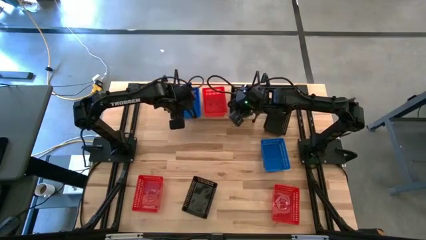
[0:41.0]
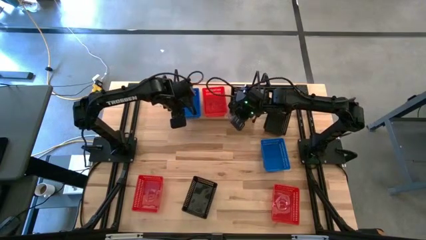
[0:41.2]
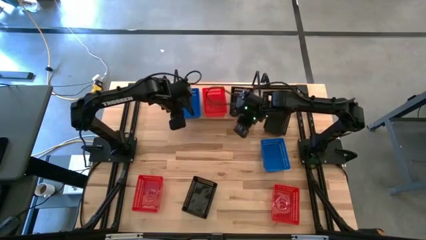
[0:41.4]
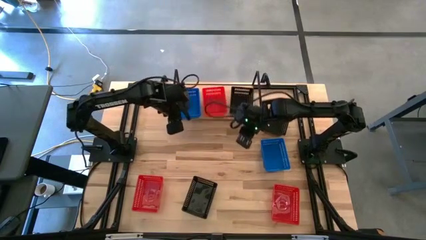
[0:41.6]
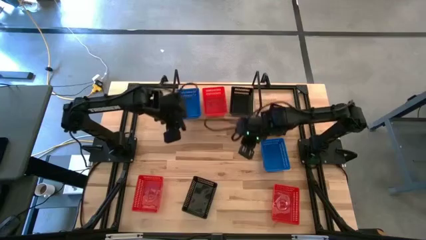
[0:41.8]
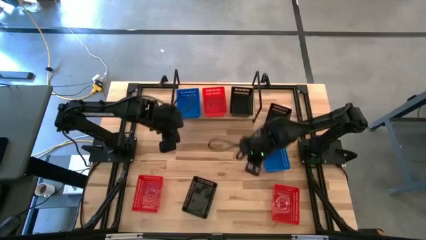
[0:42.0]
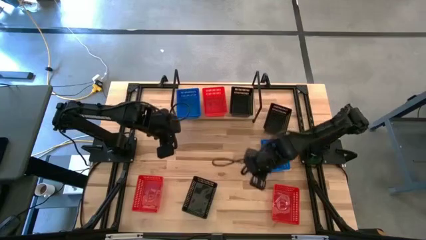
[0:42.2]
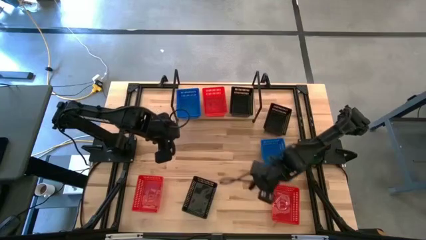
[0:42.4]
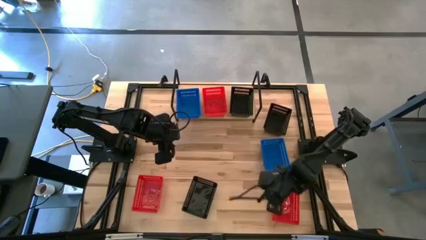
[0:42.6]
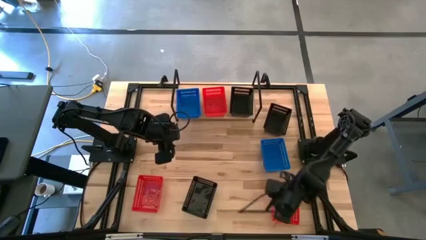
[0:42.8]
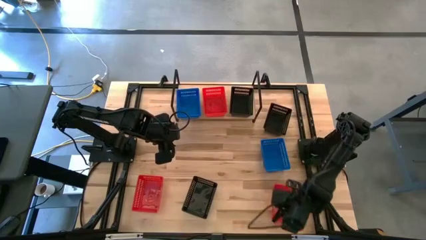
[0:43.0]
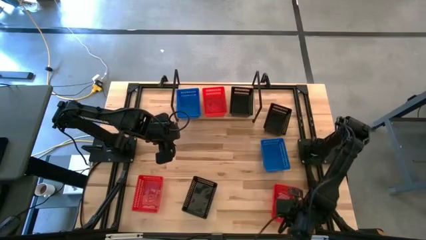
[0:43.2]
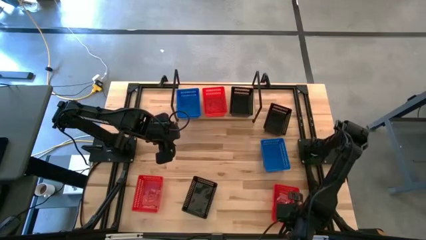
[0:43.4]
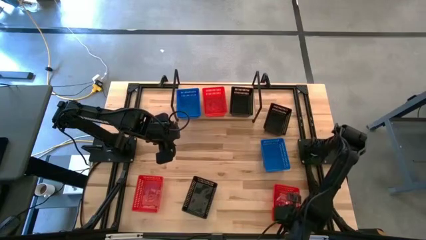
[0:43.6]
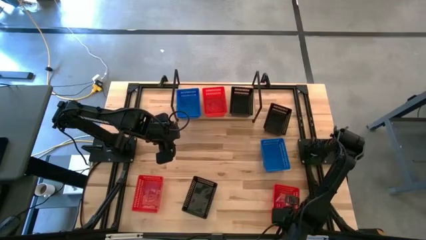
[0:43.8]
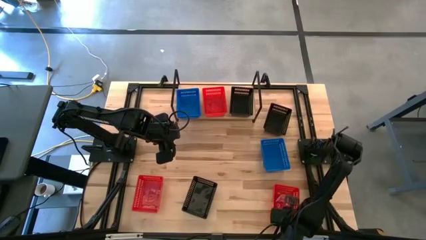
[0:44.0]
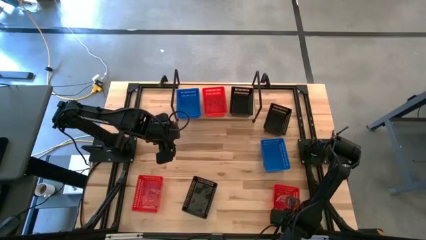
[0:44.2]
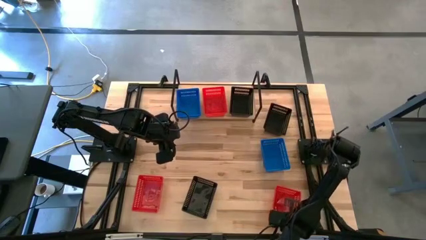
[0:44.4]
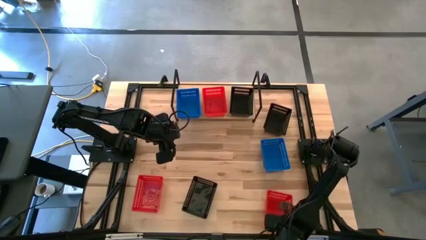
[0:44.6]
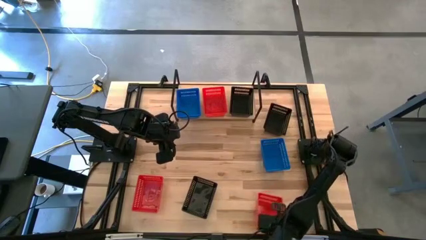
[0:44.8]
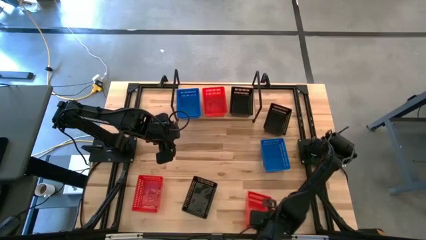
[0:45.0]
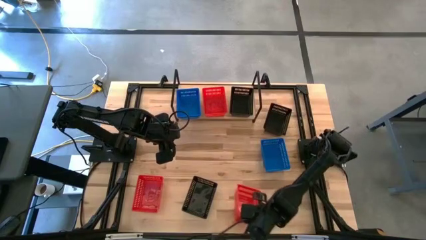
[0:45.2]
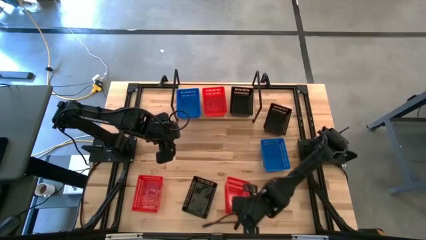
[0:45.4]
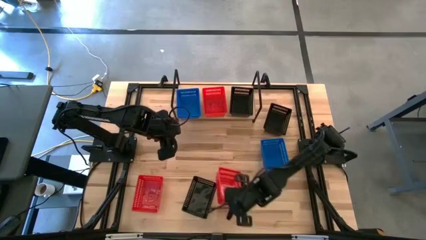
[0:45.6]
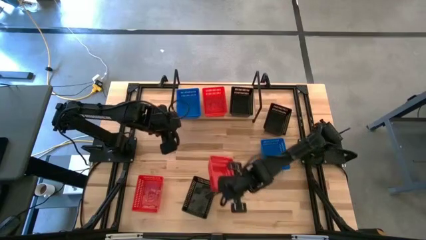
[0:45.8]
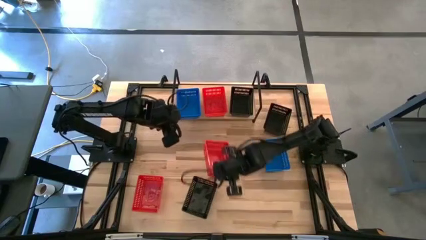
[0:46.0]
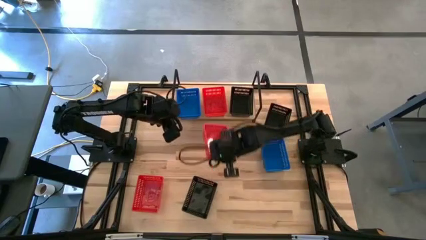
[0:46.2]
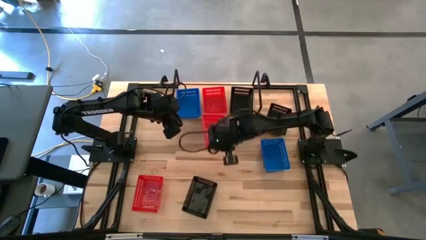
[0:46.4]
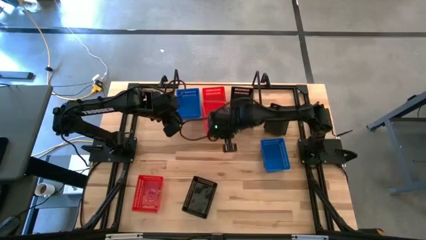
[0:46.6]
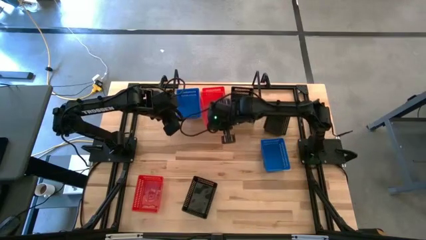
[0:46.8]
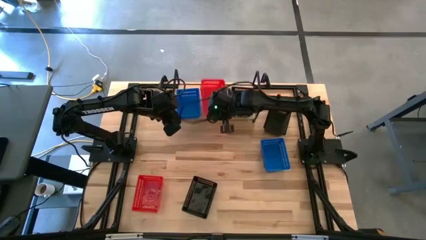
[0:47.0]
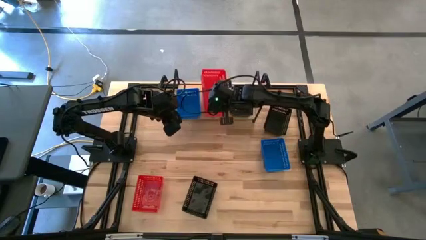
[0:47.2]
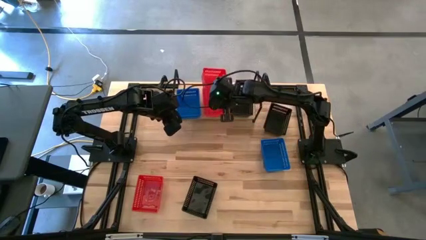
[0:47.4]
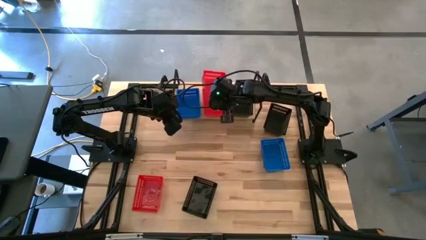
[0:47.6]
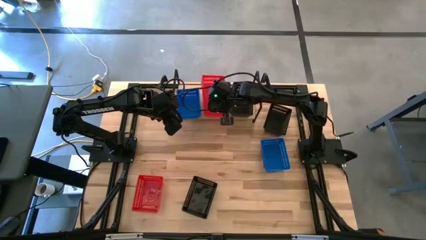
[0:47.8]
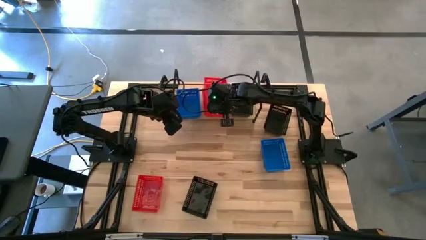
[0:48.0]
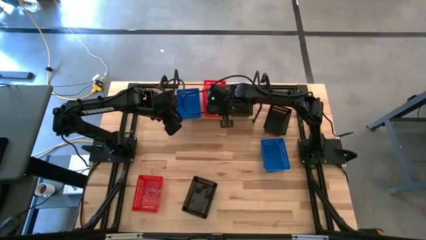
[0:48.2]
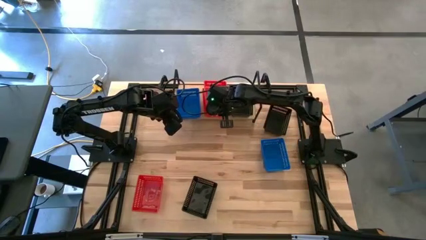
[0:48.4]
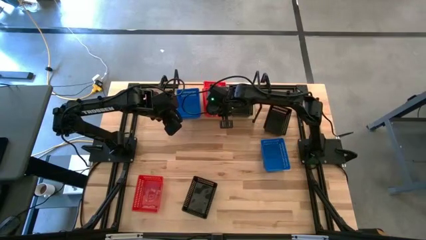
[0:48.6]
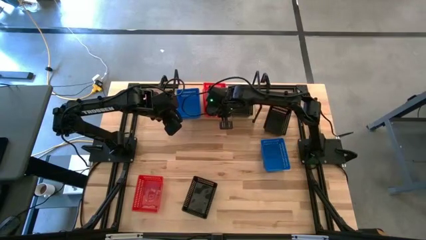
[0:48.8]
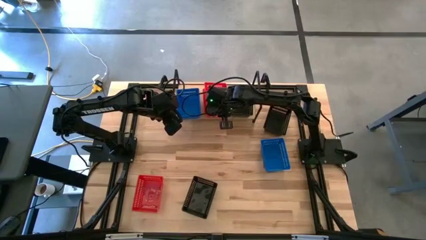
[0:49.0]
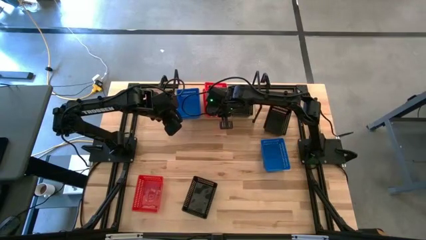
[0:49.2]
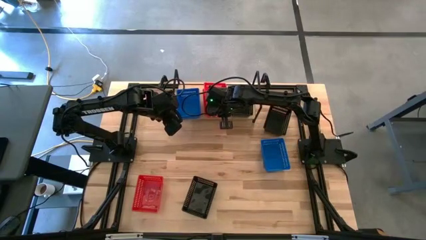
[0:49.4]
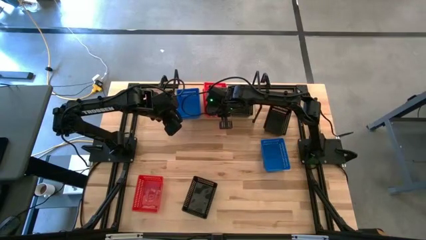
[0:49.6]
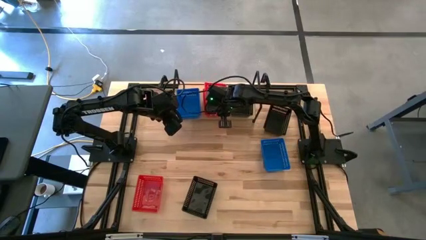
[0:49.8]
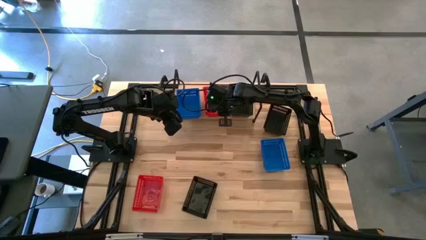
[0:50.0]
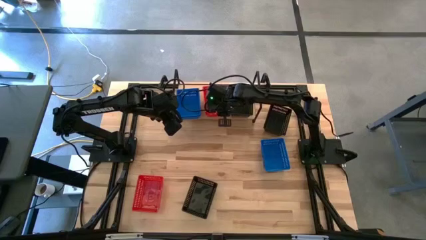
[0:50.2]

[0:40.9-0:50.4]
Task: Stack baskets on shelf by color
Stack the right red bin on top of the red bin on the shelf

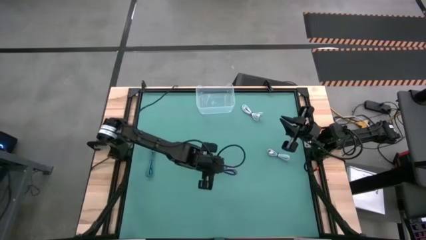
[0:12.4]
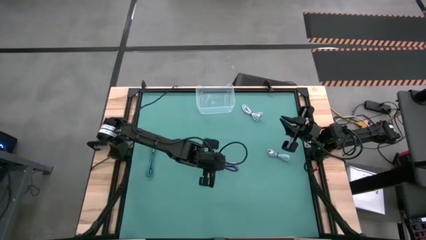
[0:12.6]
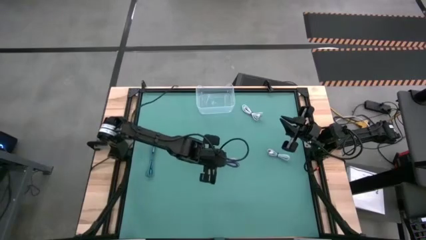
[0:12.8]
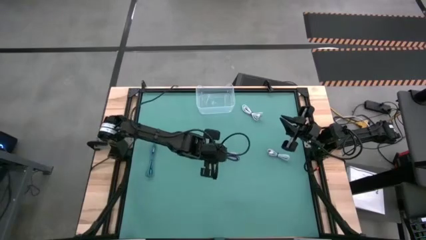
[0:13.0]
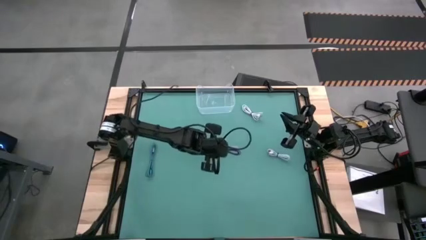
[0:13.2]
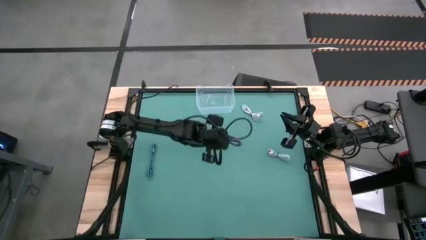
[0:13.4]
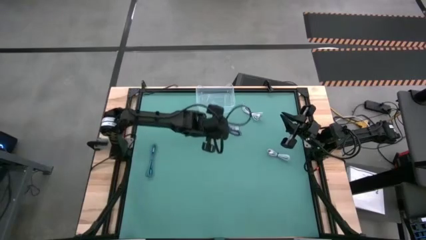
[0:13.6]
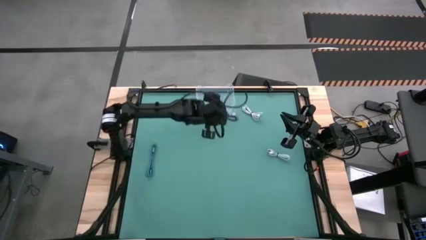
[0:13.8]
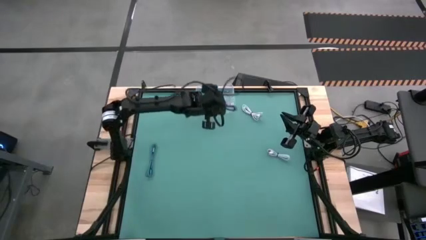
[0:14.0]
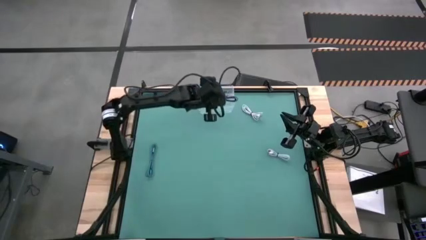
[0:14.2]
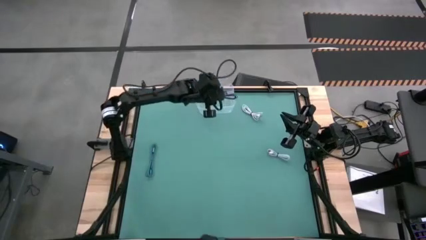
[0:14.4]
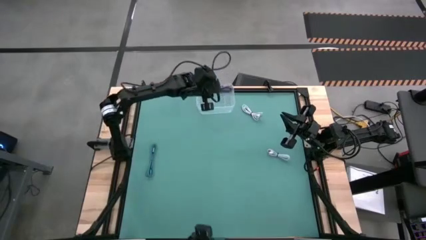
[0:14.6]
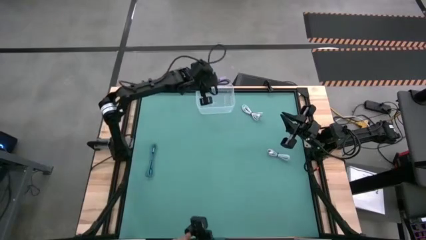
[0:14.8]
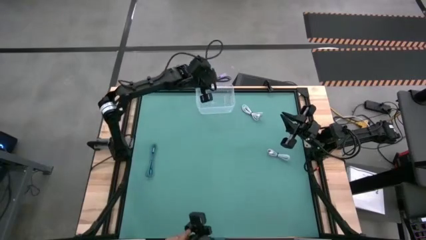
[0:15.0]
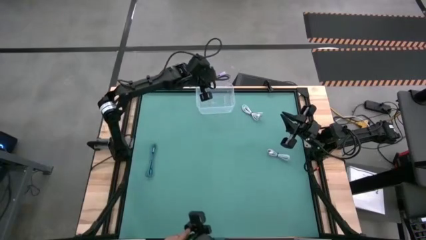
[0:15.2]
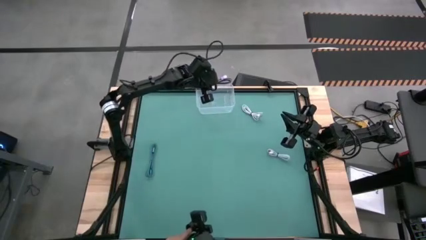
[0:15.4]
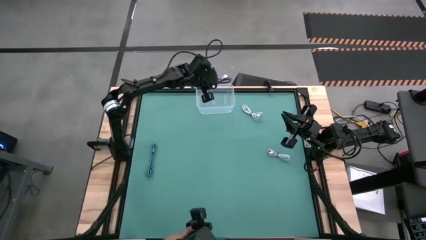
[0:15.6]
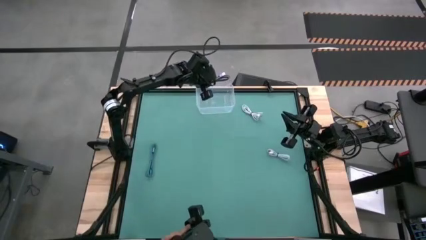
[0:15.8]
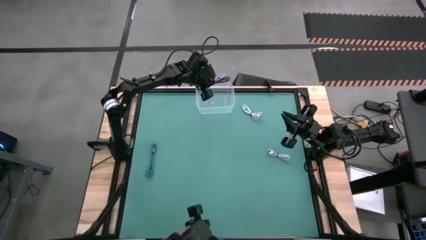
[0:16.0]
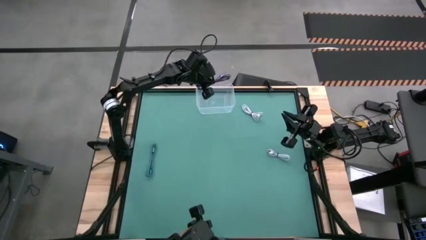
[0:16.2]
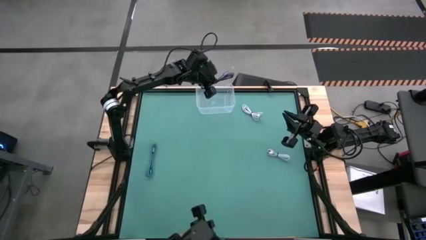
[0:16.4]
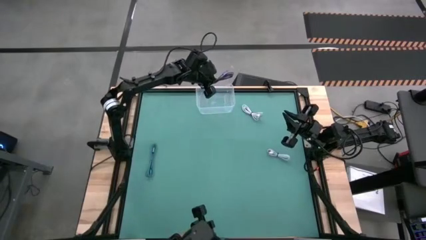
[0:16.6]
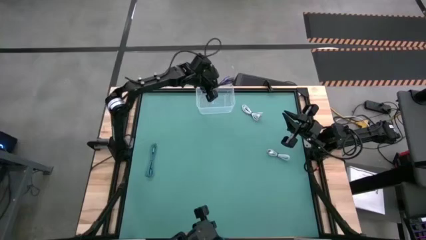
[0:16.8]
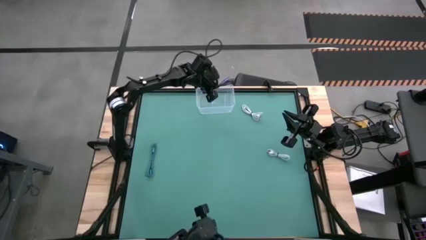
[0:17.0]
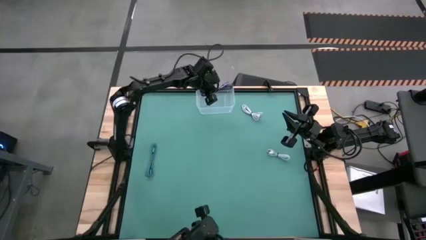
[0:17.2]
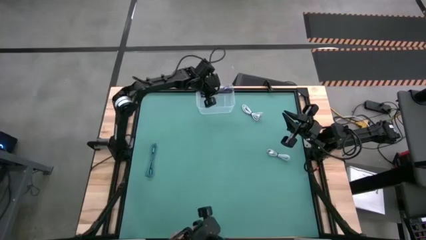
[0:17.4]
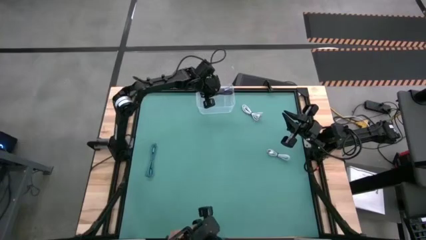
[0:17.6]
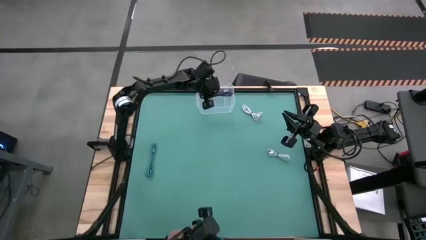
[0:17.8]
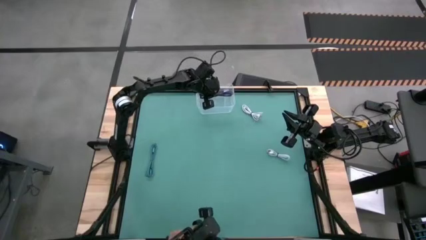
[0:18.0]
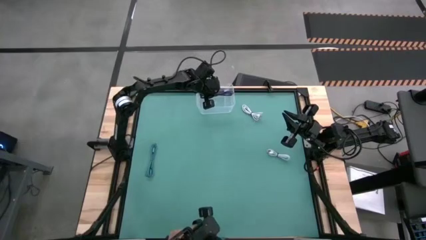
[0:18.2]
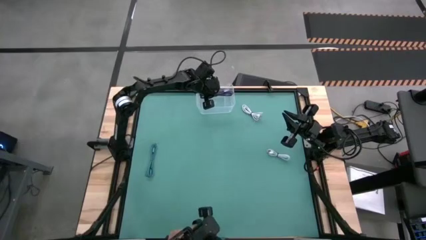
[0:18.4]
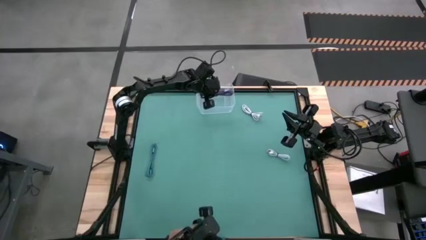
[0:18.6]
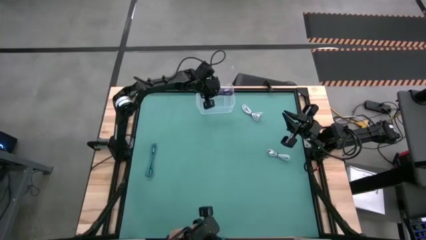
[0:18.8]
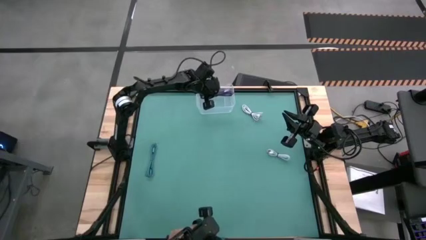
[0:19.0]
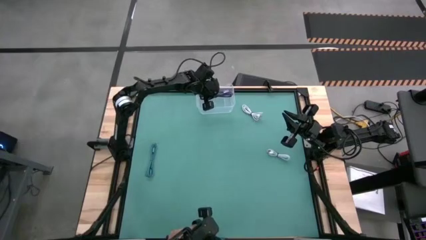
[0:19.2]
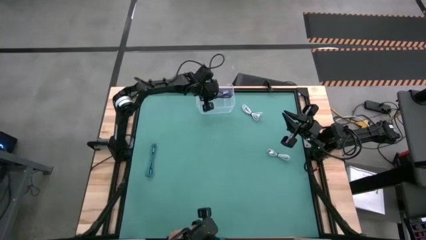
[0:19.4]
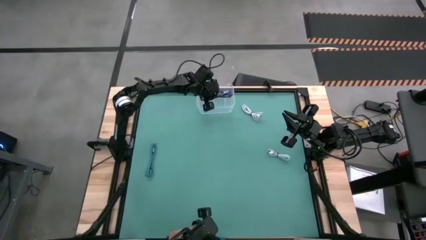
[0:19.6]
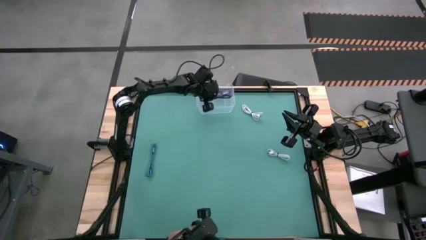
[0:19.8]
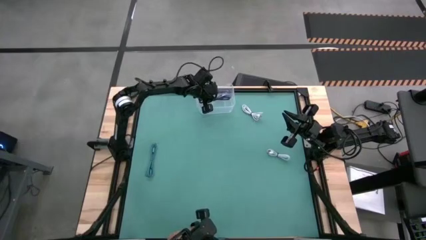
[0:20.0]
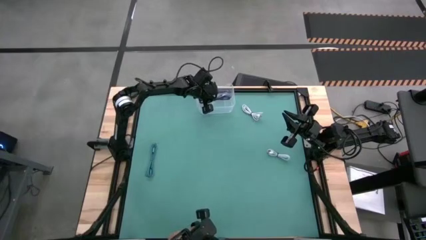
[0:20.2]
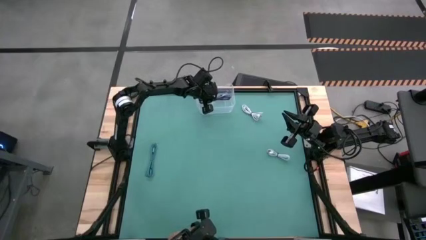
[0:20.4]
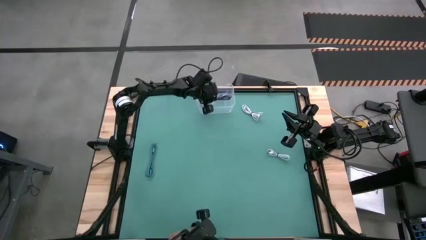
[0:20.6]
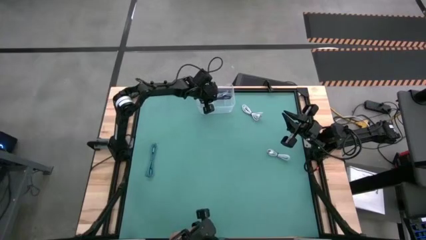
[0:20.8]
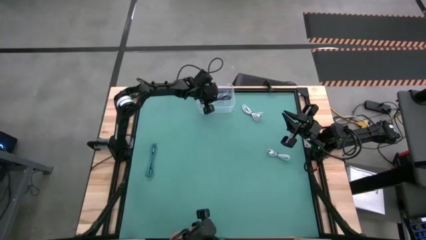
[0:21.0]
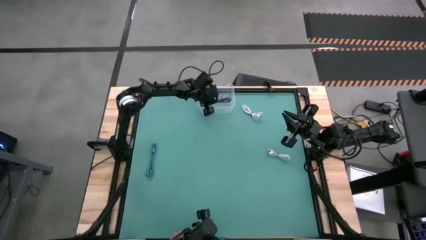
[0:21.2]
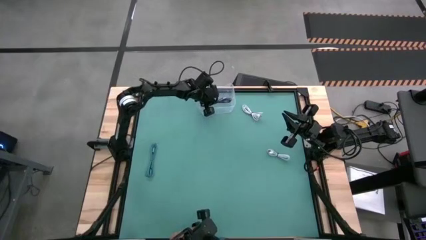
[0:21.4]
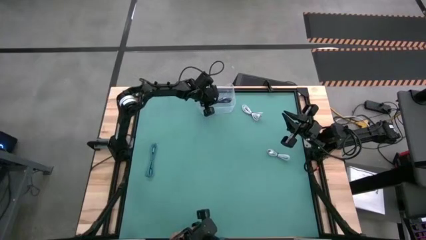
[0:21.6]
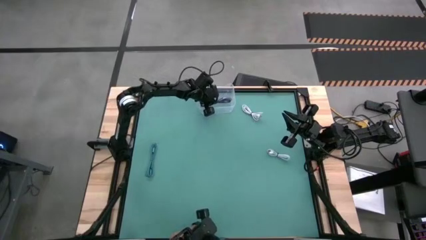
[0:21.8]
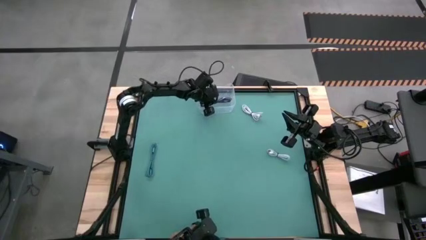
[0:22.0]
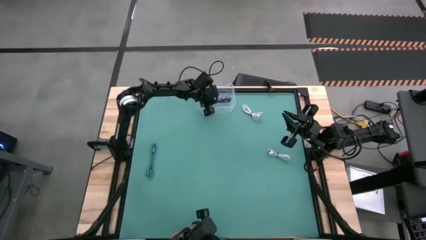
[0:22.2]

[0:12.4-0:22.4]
Task: Pick and place USB-C Cables
Put the purple charger cable into the transparent bin
